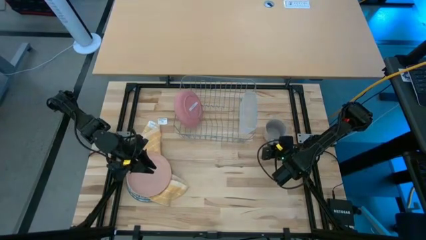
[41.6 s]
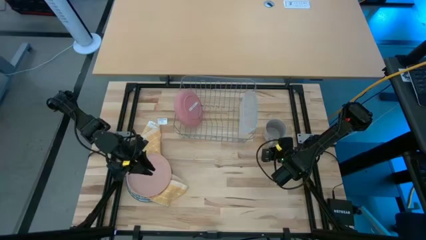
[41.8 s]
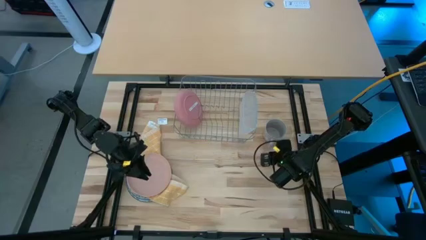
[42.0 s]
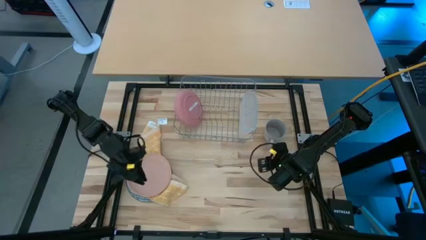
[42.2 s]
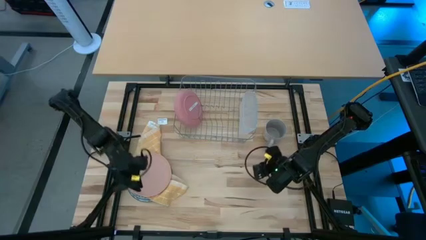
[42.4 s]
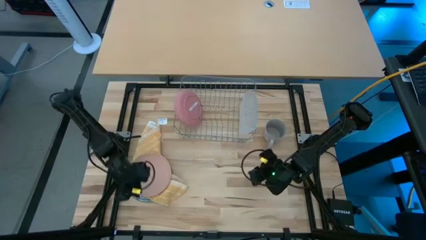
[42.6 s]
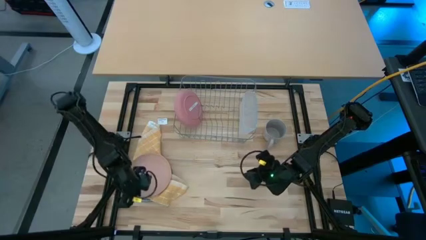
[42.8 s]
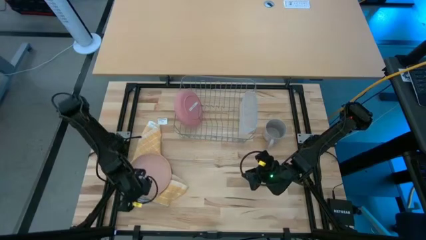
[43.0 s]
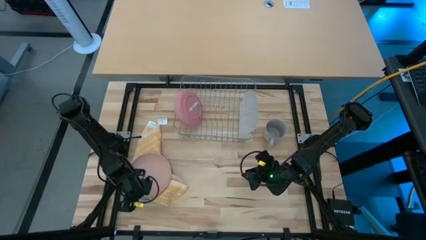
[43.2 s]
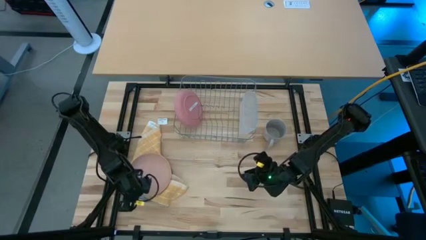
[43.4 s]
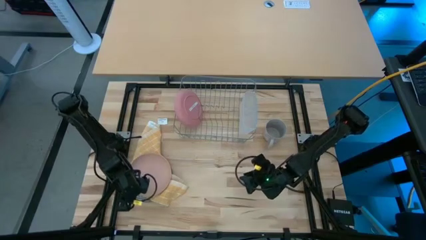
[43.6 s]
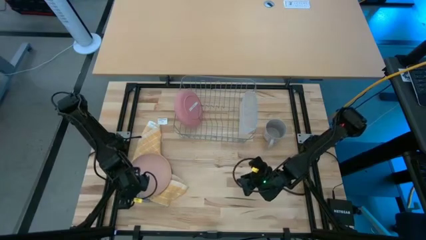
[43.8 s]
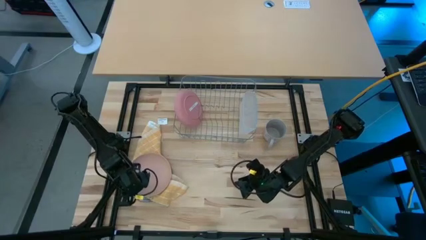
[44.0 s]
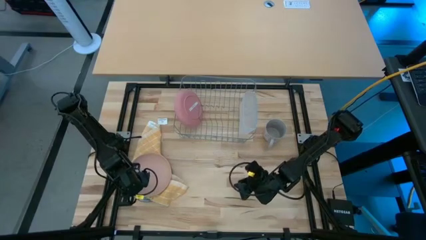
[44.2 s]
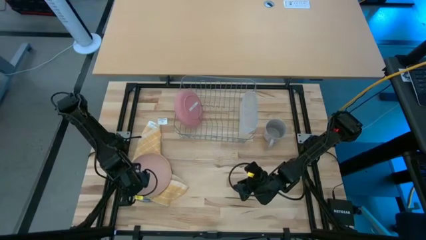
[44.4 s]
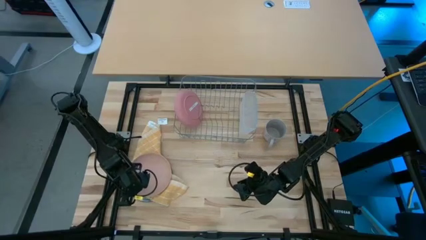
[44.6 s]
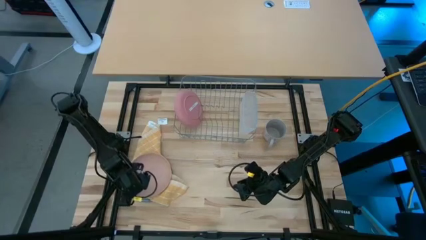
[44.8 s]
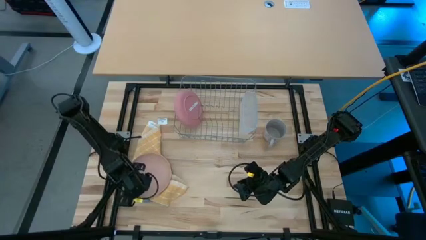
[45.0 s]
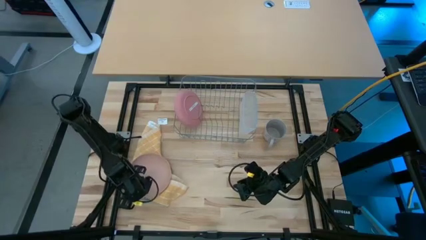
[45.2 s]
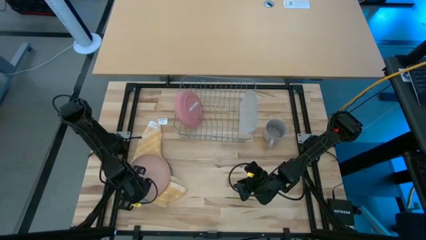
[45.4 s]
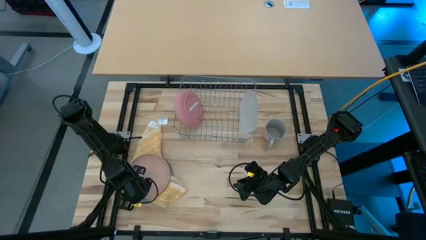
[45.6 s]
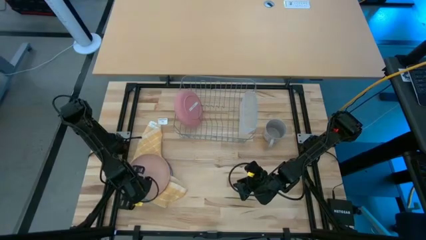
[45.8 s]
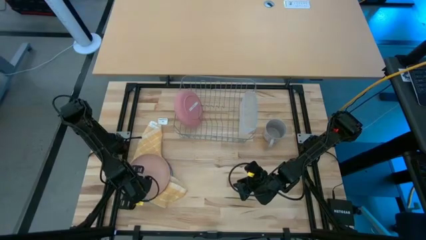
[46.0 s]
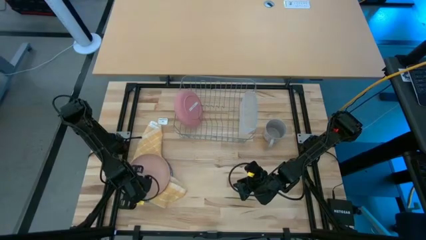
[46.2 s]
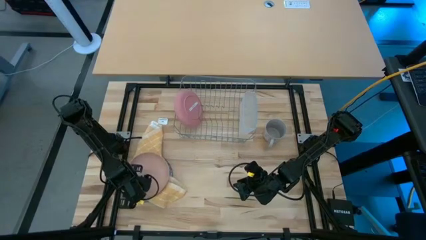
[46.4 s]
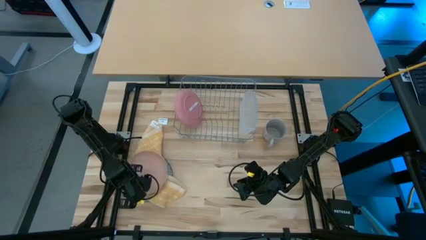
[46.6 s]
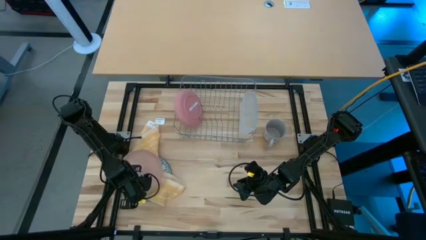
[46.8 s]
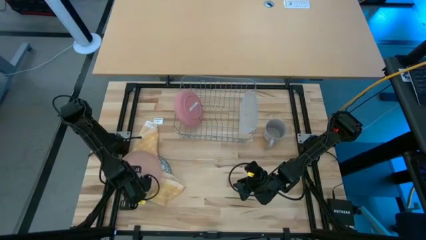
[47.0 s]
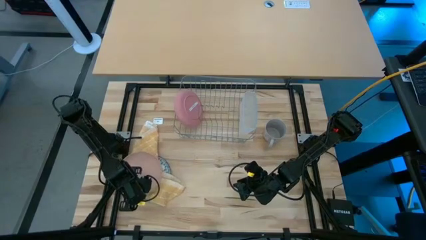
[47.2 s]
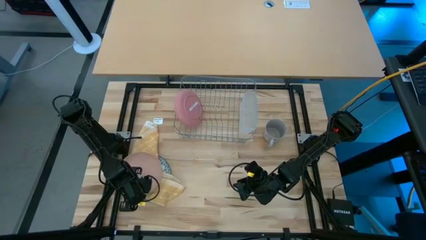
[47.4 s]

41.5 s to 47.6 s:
Task: Sort dishes
Put the brown plate into the dish rack

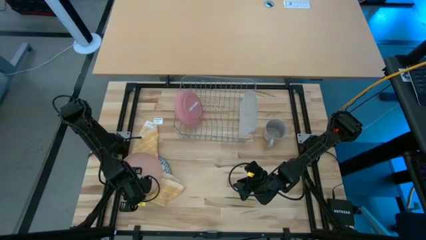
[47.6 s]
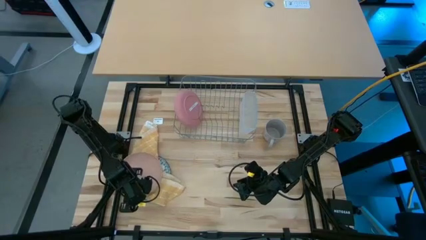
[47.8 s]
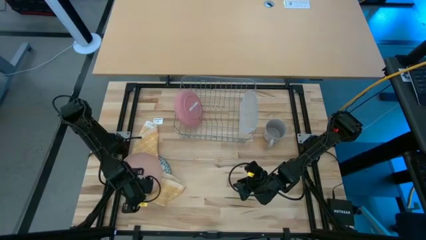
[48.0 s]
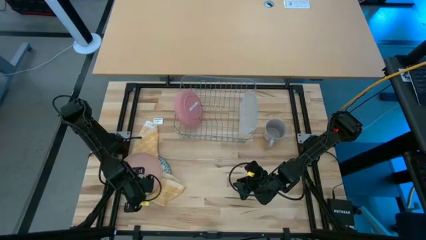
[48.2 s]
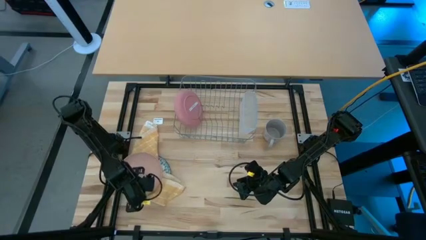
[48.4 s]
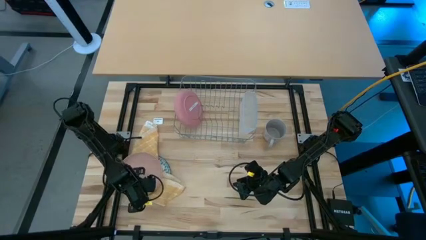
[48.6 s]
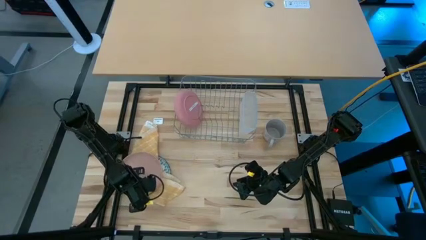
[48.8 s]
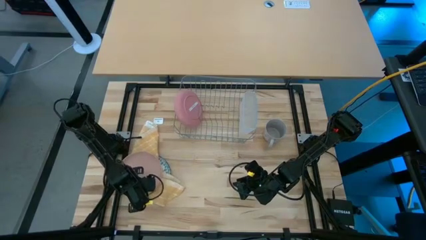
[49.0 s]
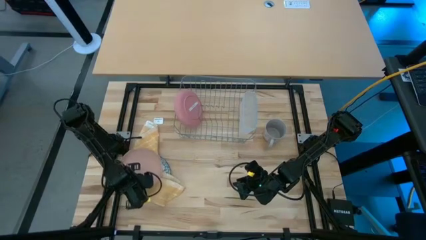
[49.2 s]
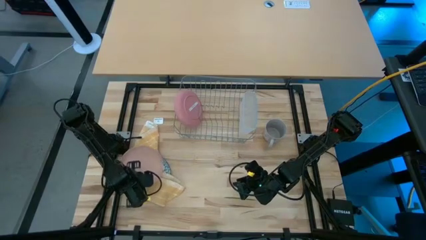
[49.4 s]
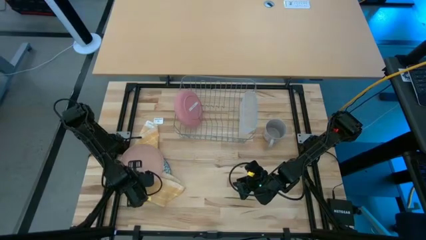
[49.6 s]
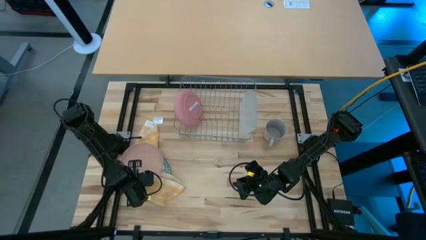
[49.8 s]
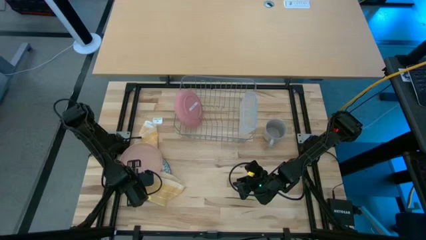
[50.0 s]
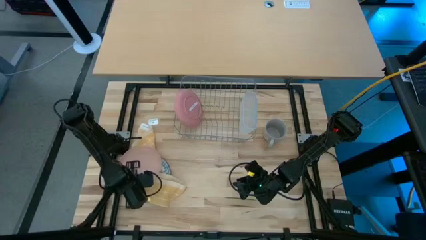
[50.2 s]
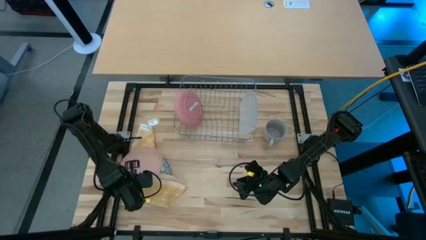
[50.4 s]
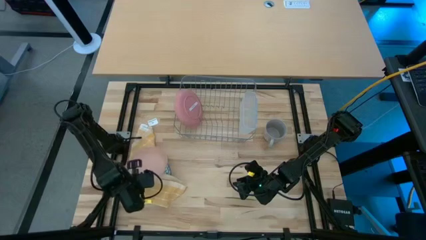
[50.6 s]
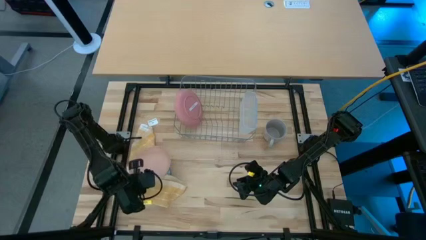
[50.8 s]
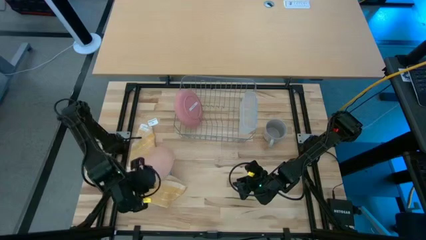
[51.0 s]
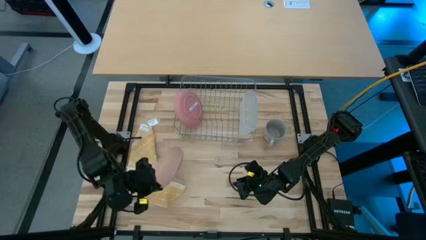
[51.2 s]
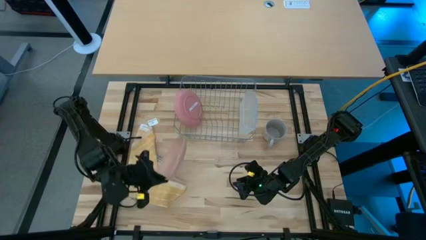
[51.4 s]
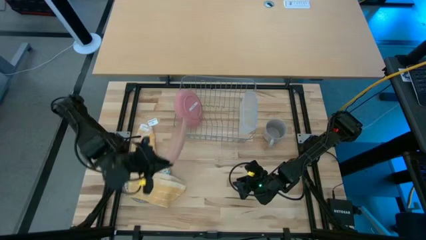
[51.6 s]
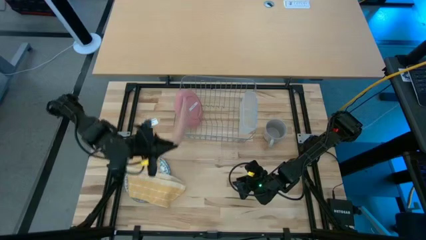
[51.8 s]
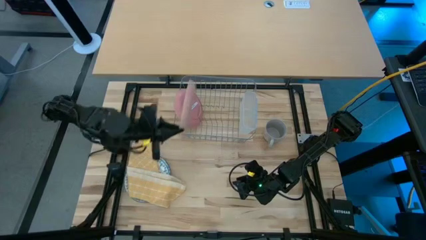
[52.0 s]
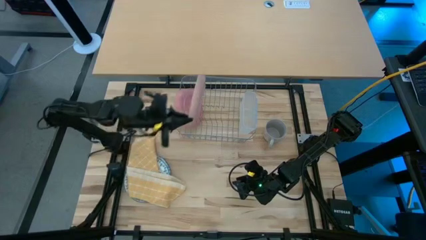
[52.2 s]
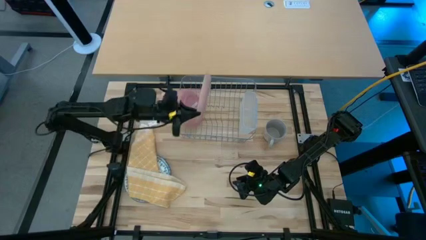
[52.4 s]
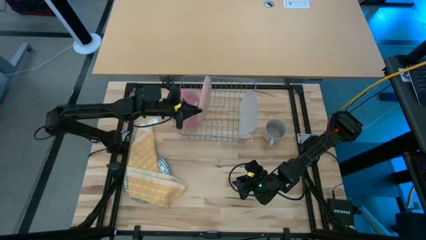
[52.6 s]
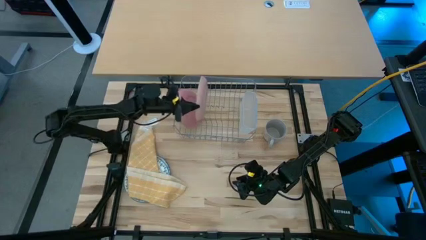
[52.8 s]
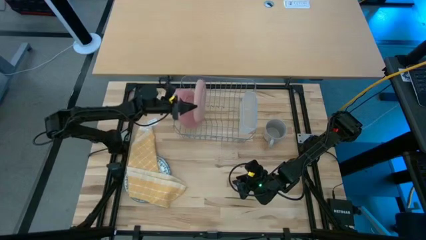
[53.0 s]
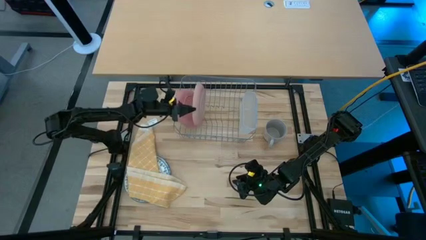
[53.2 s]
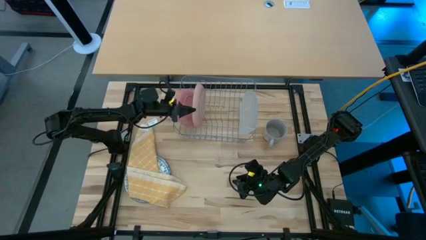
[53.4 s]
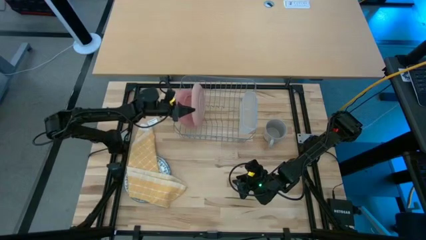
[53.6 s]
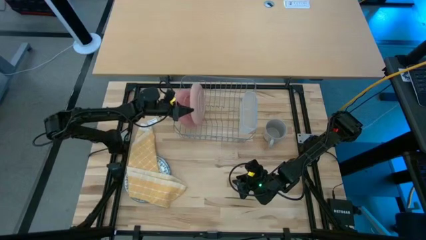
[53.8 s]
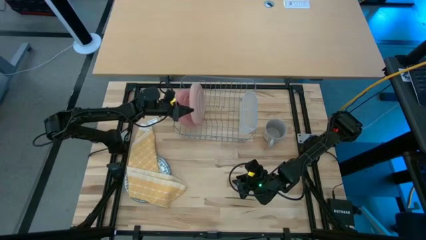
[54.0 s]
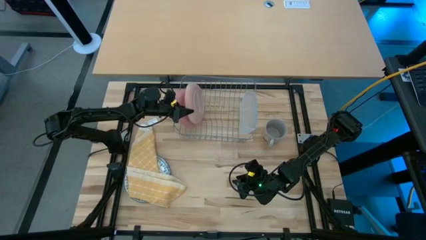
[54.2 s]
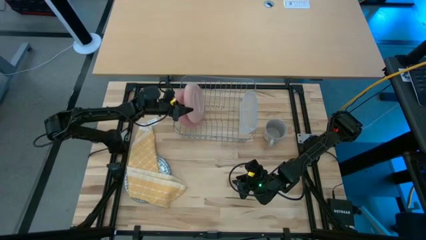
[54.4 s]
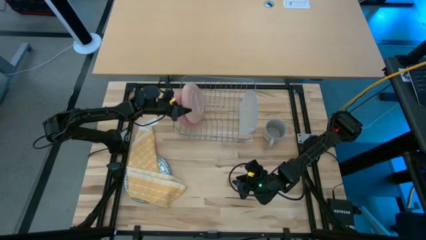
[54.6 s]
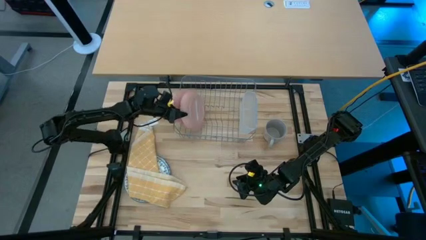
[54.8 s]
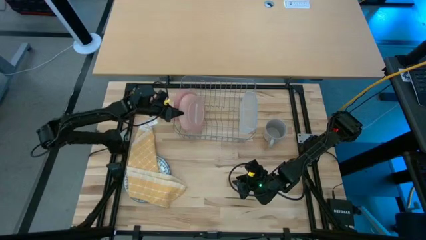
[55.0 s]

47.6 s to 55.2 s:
Put the brown plate into the dish rack

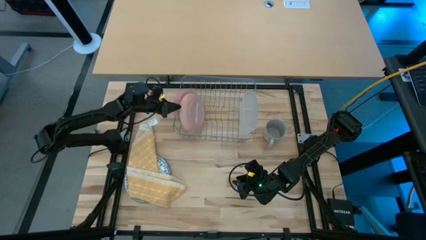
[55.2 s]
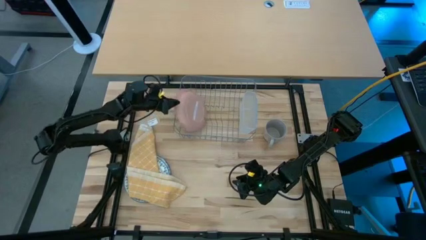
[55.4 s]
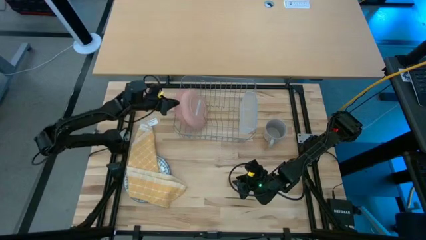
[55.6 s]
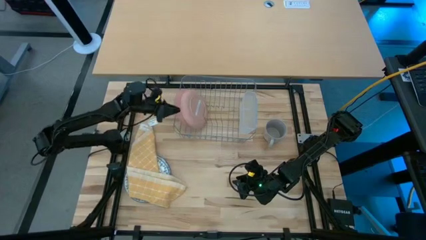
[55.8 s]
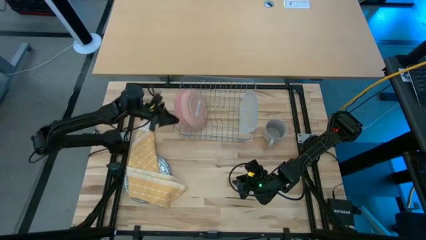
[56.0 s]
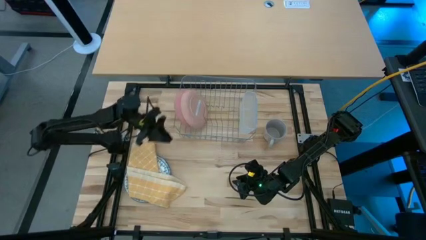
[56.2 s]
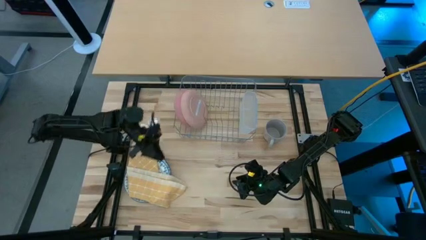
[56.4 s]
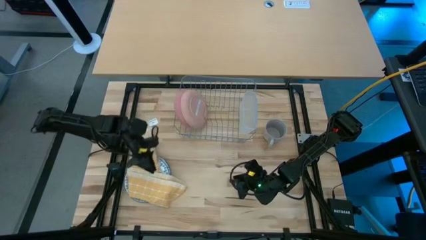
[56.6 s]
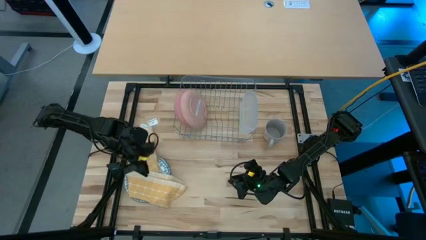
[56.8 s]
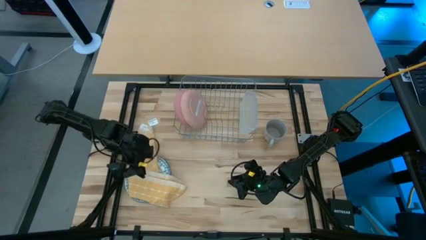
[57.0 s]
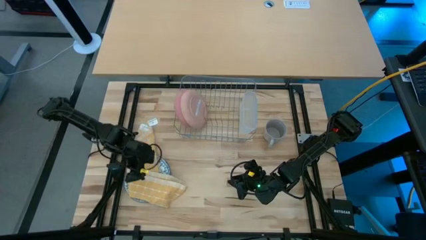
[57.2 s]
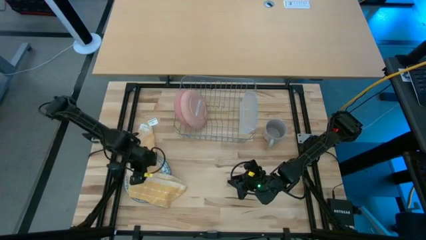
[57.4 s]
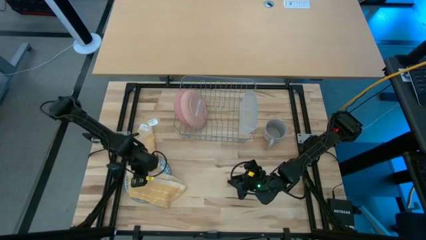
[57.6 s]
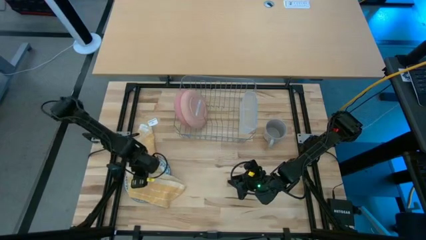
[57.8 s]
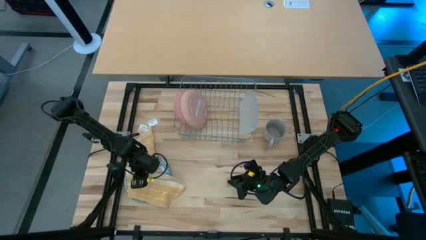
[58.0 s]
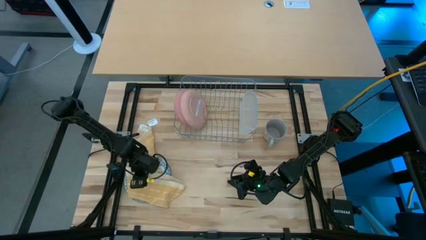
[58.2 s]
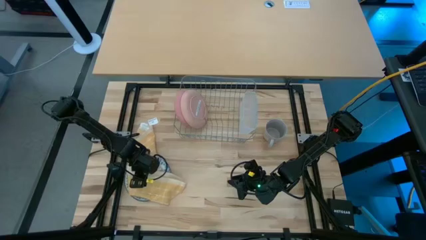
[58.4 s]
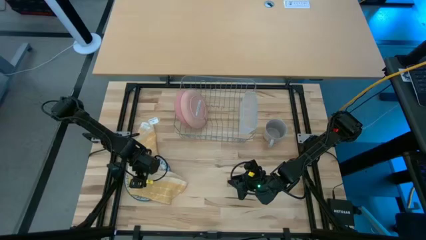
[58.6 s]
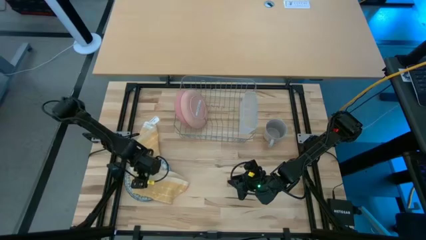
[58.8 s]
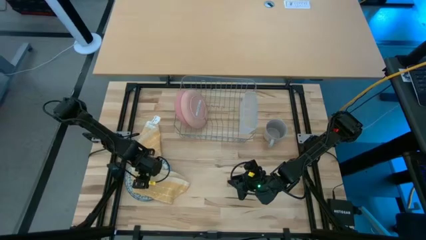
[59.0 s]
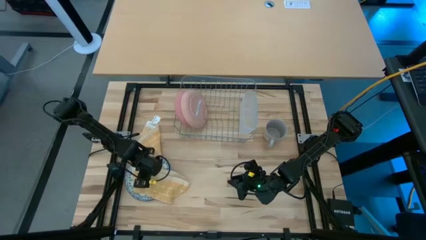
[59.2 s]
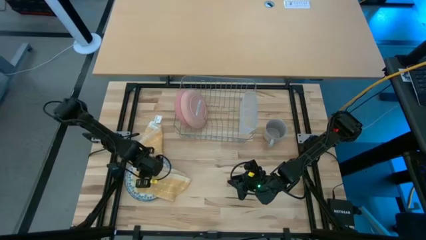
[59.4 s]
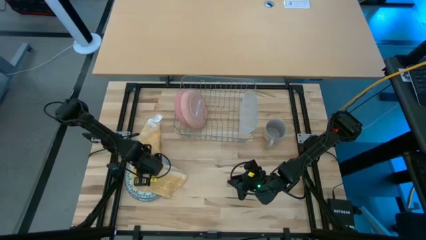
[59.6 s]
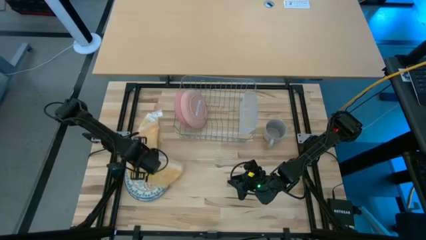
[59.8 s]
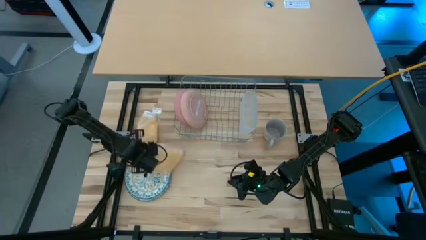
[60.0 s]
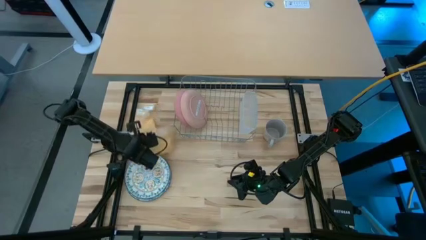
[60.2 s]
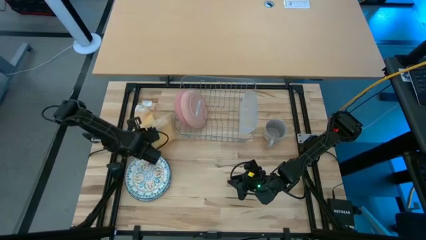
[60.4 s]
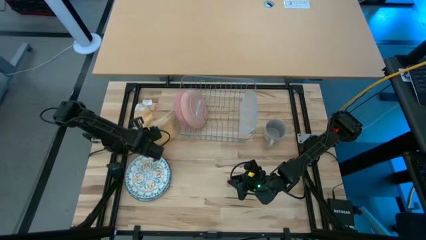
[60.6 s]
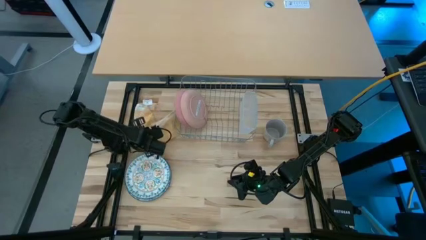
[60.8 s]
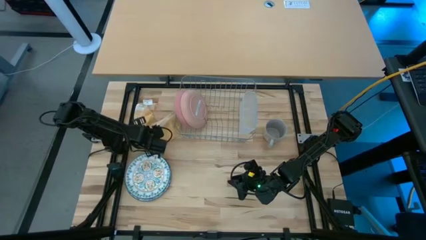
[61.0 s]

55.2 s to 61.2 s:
Move the orange towel to the top left of the table
